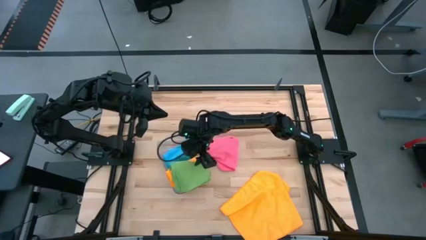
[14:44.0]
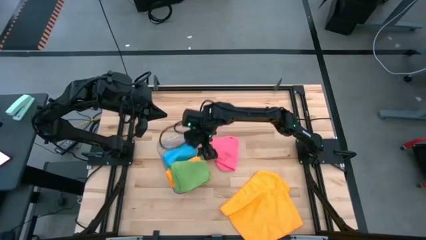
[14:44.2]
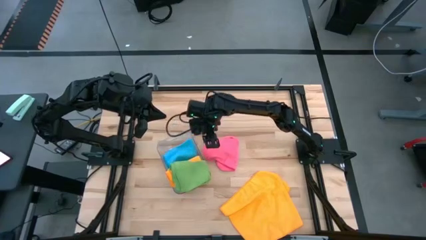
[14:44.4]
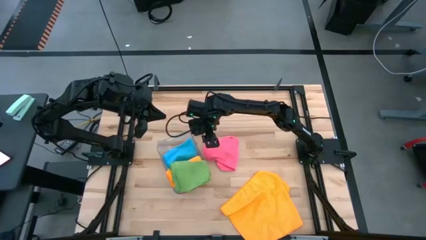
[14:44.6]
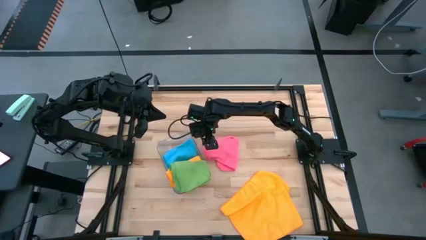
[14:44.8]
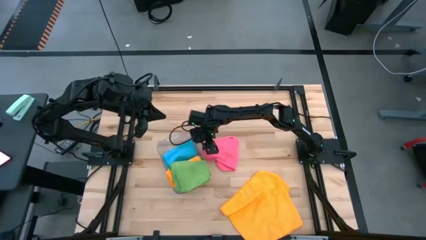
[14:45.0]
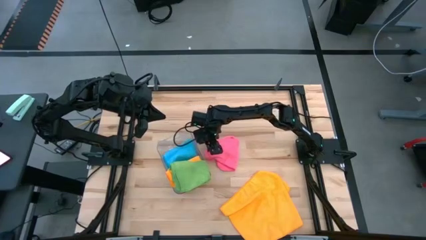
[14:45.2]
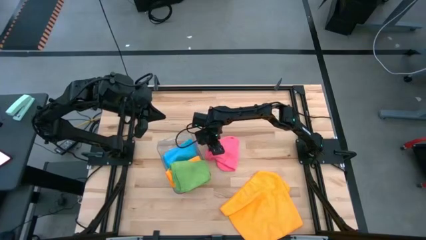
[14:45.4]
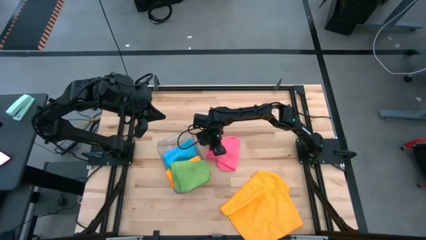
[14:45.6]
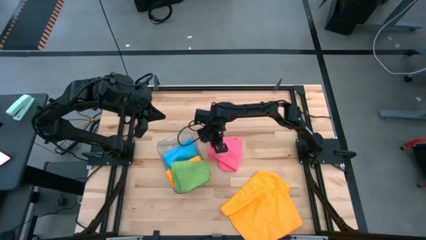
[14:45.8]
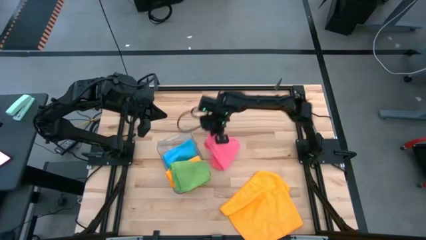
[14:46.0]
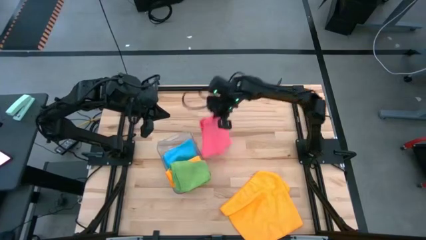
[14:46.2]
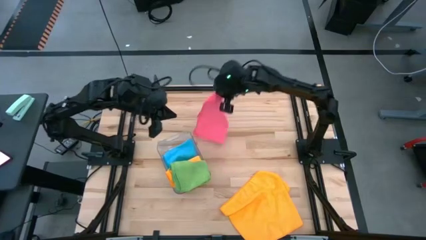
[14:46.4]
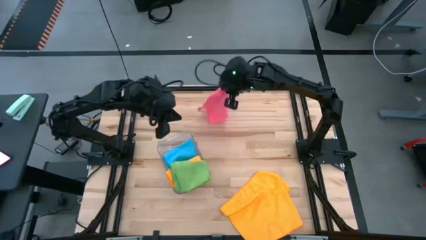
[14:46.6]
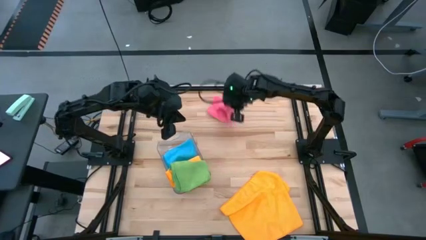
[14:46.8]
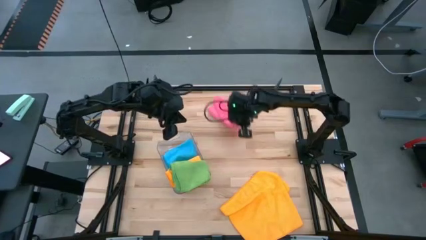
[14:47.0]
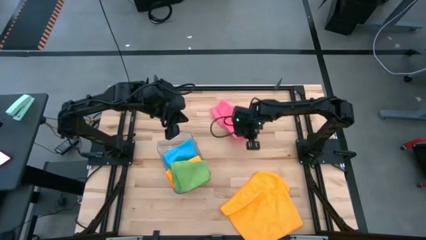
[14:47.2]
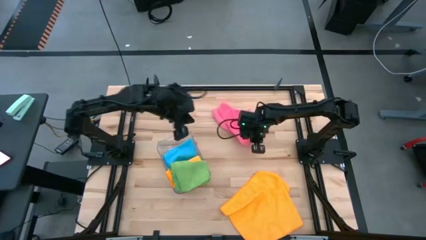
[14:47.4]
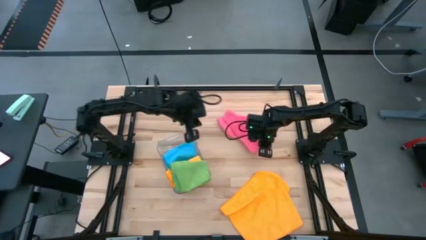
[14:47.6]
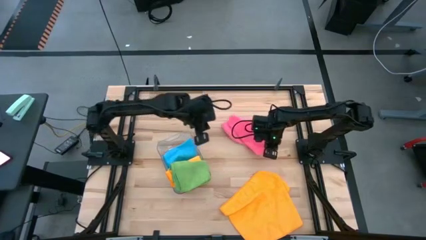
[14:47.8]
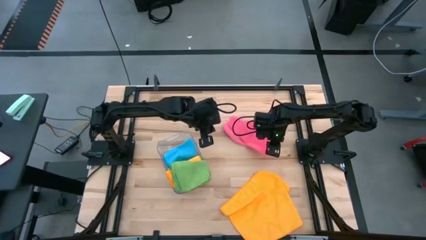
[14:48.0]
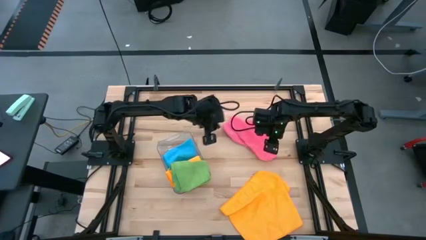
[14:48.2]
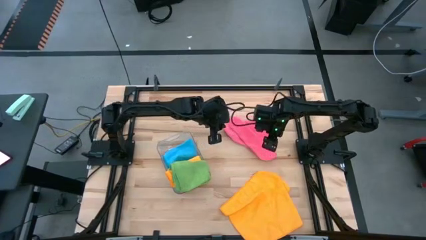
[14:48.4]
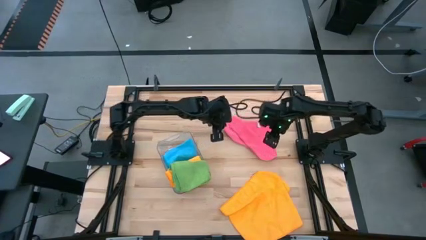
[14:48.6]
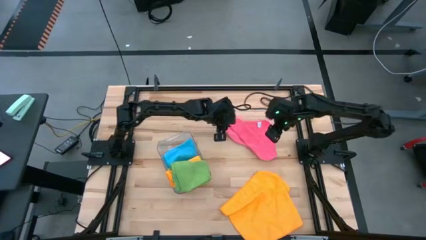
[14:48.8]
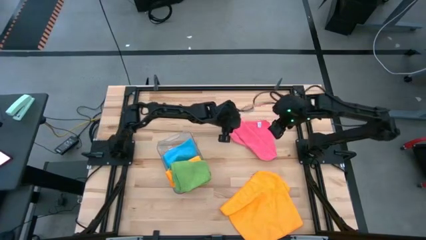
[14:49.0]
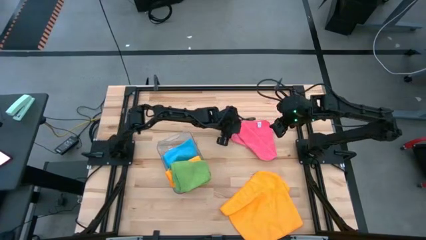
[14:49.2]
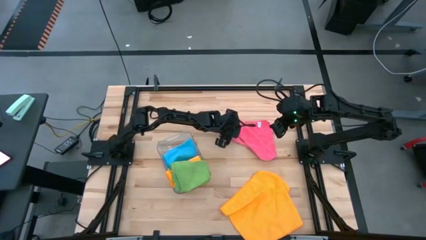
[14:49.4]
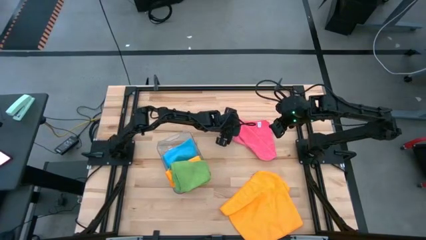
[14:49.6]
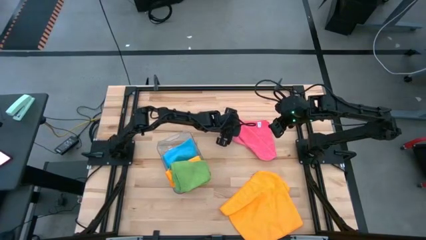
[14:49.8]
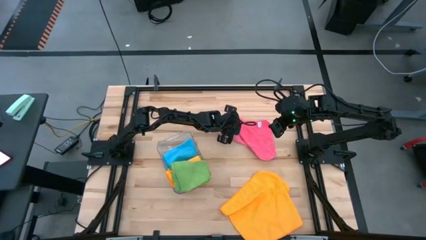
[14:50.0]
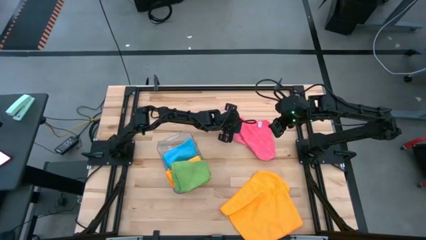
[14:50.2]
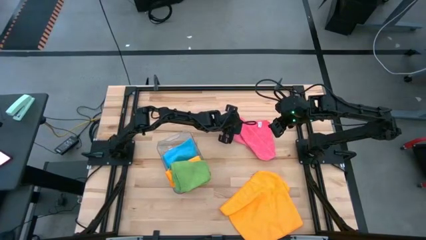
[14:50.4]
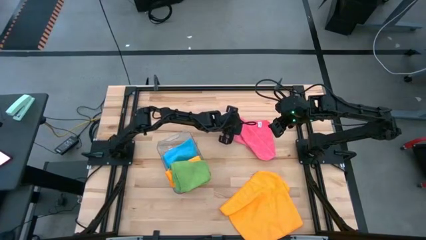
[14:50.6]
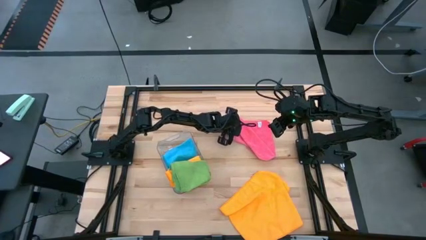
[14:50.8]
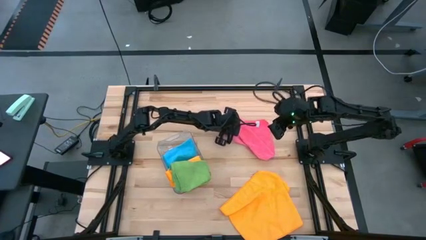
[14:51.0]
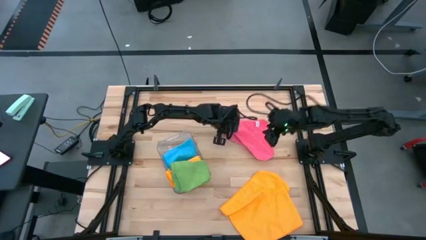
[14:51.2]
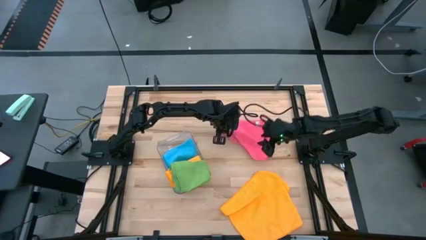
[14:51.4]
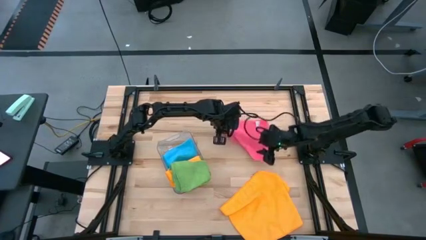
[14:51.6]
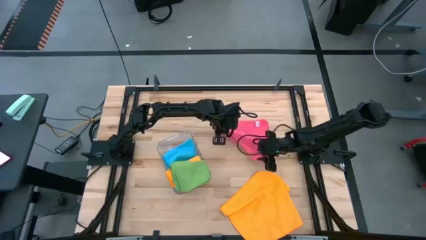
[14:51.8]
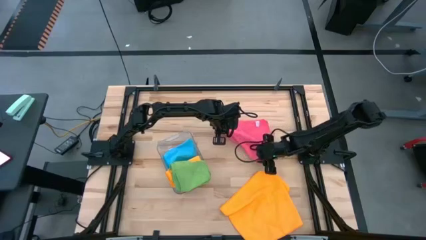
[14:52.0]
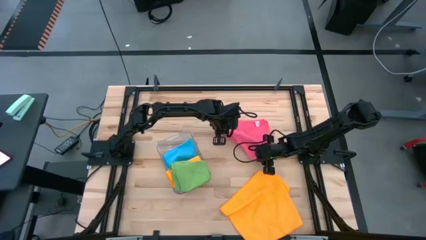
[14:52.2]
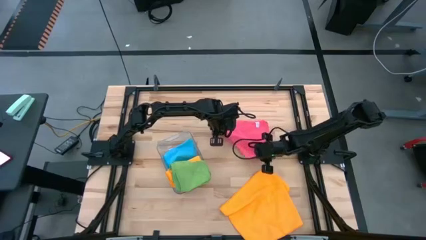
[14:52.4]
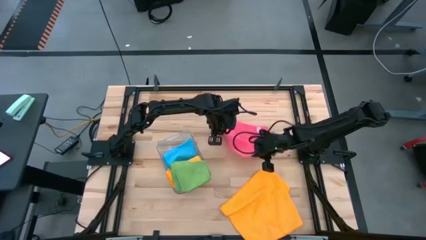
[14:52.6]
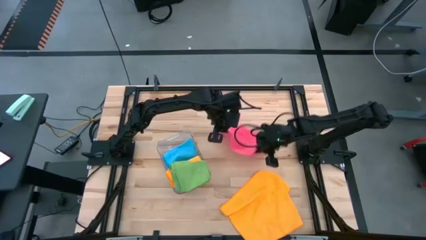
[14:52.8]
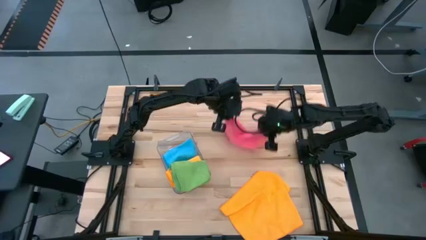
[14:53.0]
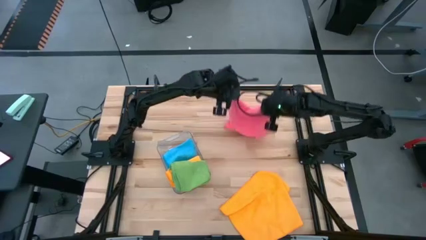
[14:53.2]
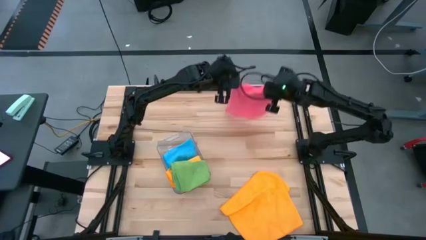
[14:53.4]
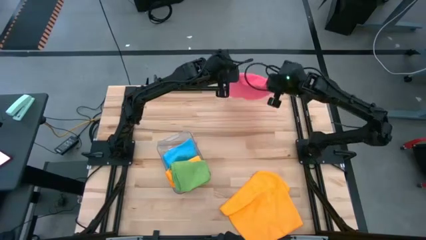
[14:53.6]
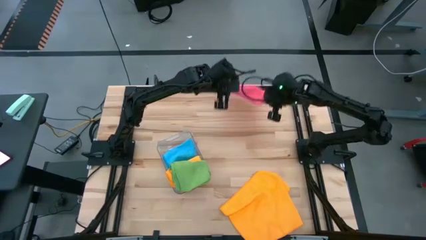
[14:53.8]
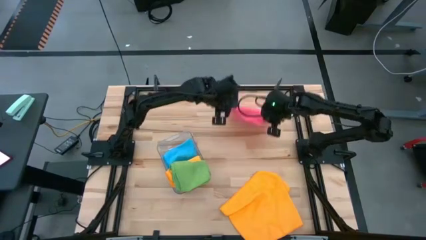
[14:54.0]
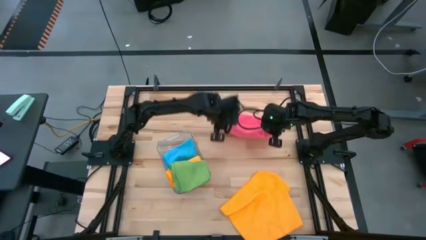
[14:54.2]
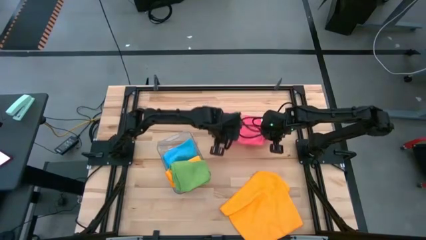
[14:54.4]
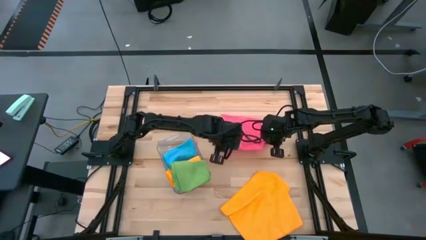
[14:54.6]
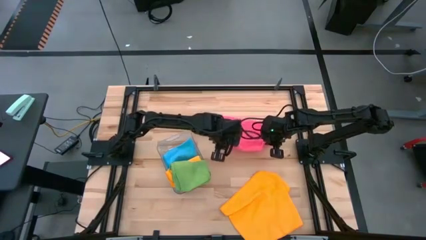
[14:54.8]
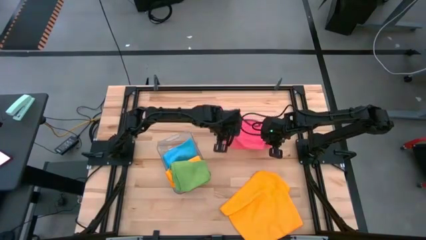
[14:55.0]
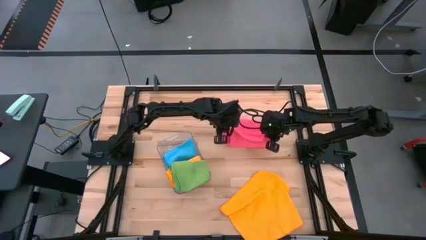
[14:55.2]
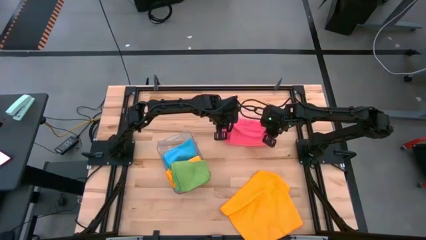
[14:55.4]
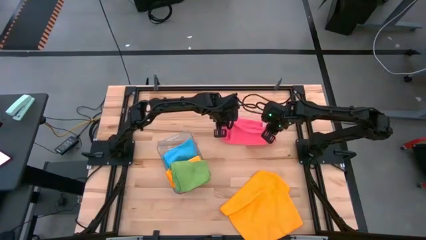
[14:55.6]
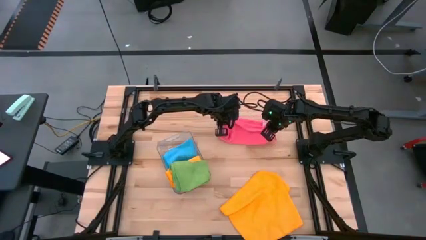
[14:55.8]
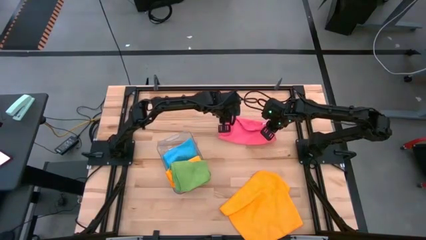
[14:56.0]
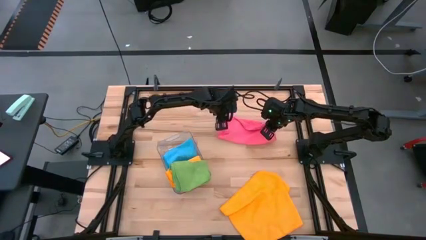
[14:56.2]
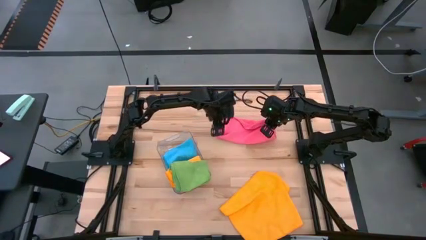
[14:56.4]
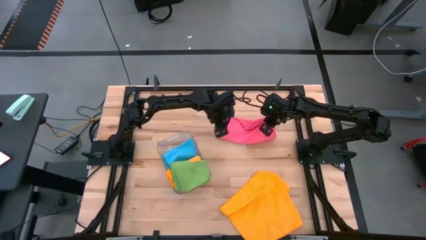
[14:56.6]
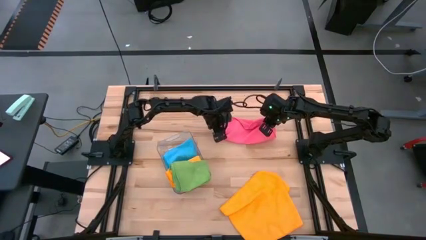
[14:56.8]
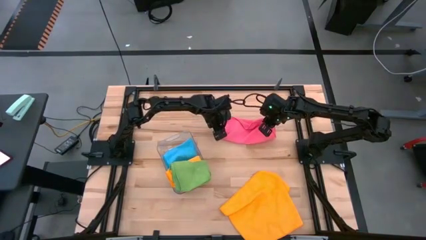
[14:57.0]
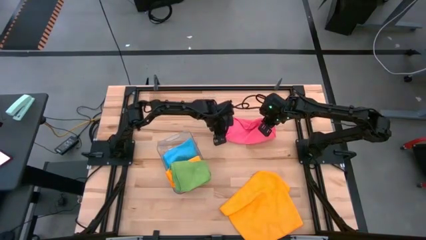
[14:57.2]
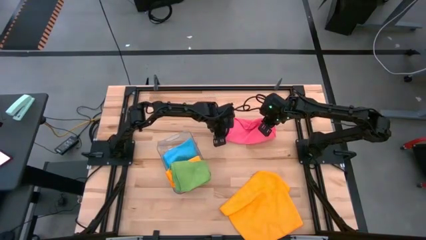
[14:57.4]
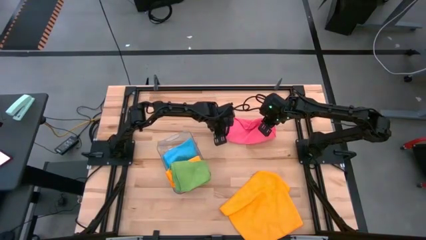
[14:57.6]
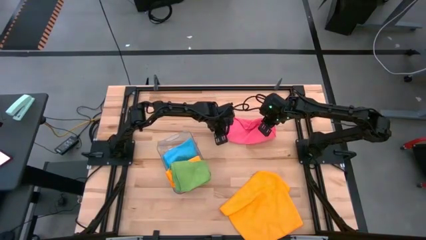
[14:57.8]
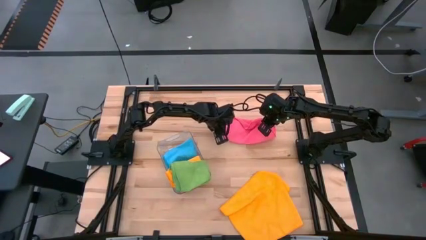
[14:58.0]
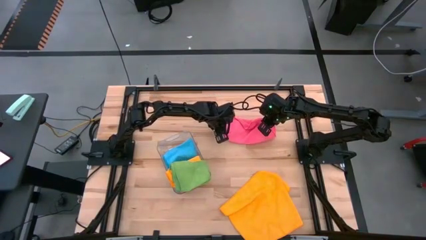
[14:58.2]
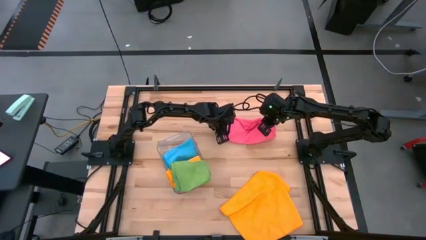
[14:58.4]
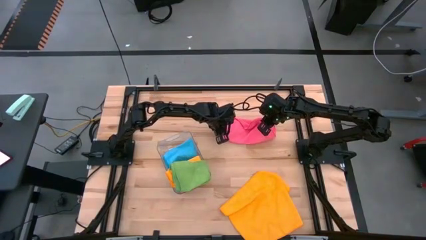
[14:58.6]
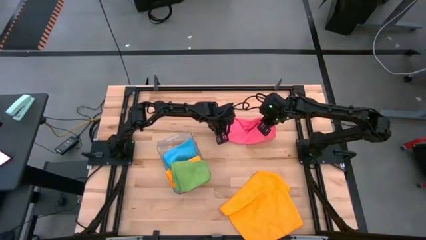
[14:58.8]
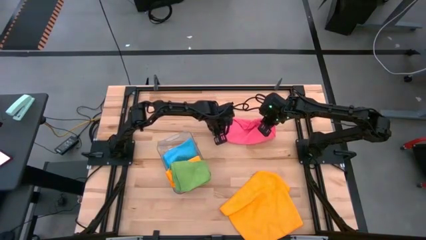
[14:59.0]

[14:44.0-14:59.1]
Task: Fold microfiber towels
Fold the pink towel
